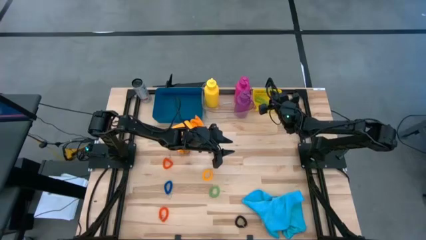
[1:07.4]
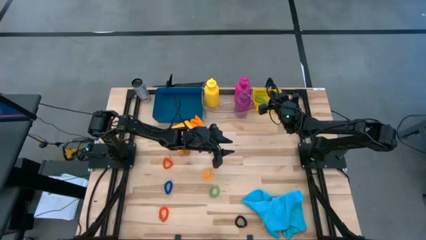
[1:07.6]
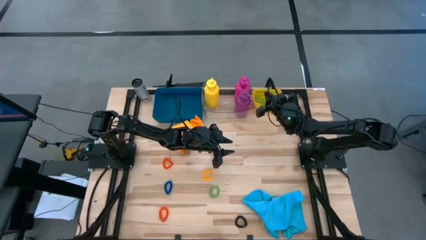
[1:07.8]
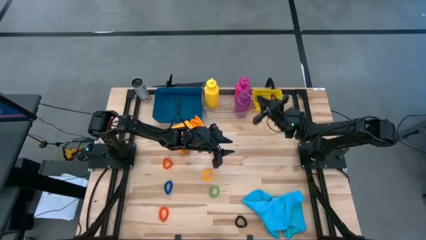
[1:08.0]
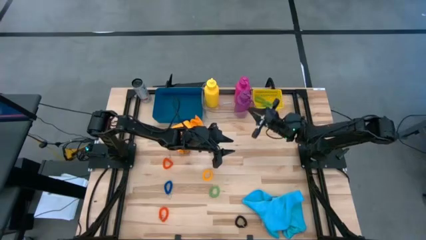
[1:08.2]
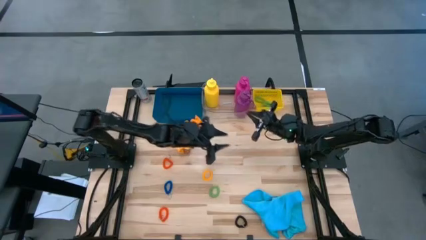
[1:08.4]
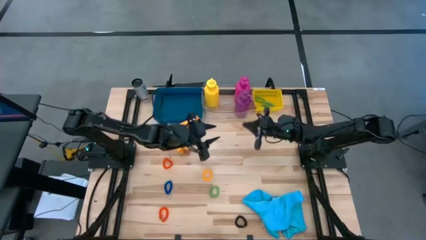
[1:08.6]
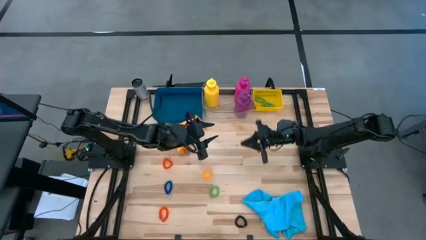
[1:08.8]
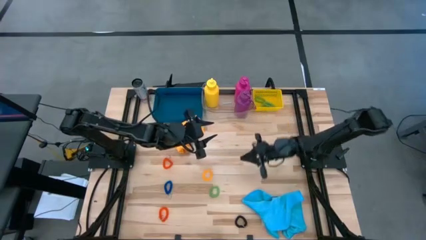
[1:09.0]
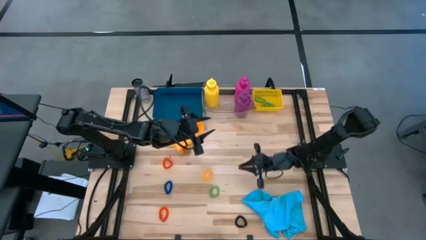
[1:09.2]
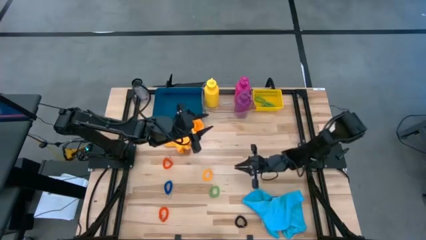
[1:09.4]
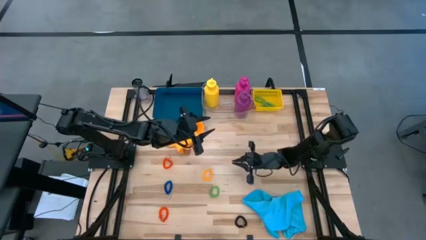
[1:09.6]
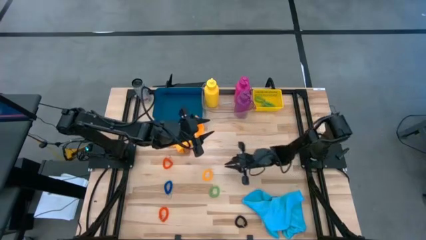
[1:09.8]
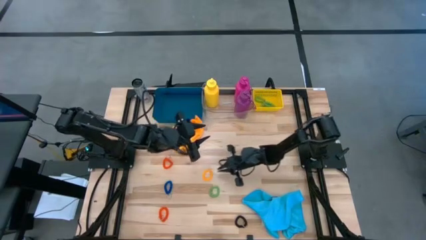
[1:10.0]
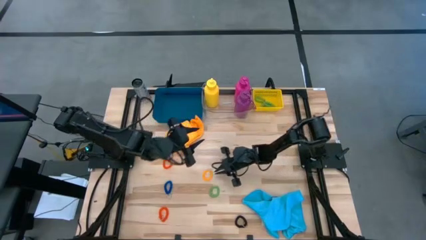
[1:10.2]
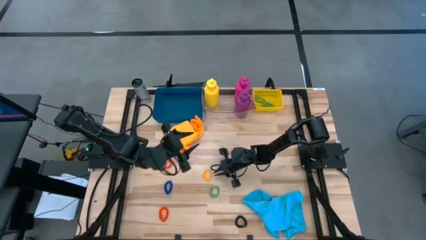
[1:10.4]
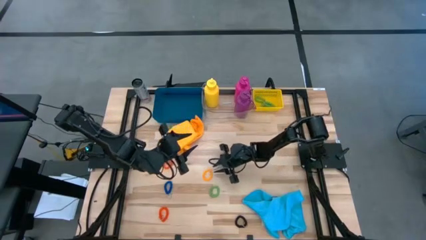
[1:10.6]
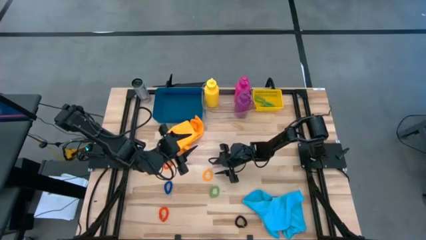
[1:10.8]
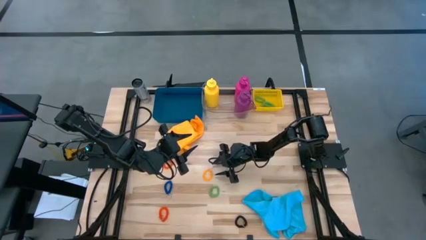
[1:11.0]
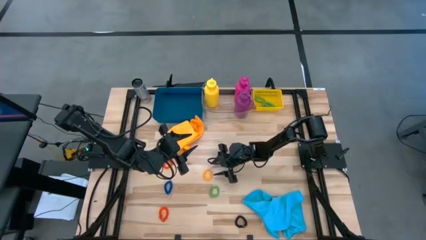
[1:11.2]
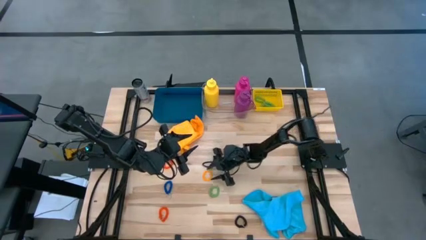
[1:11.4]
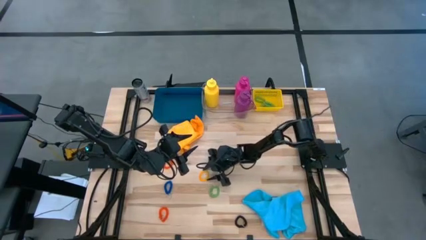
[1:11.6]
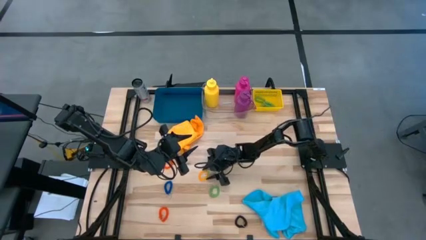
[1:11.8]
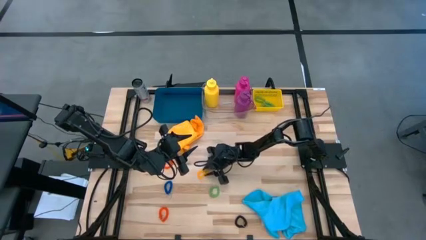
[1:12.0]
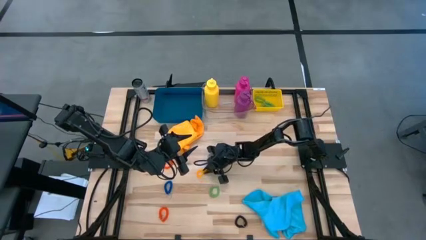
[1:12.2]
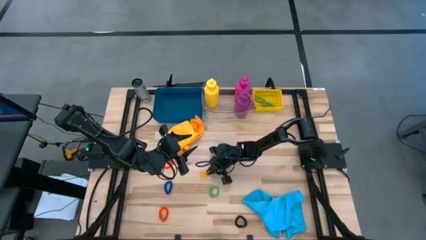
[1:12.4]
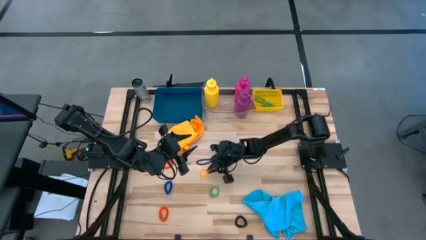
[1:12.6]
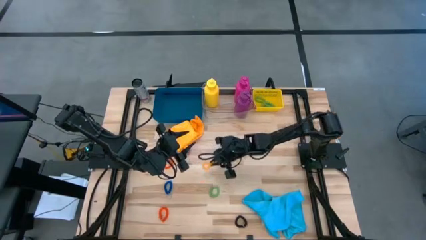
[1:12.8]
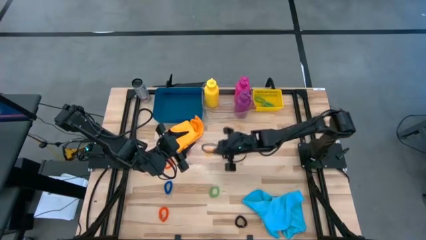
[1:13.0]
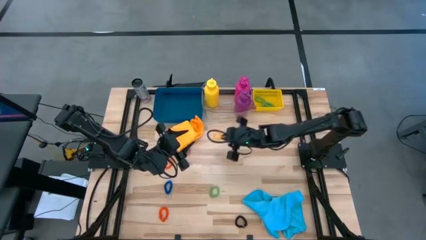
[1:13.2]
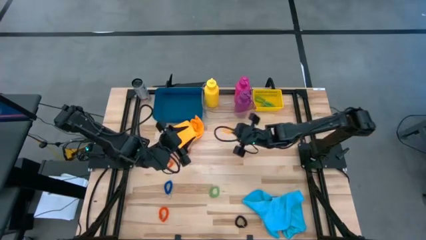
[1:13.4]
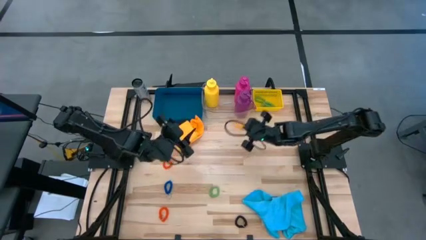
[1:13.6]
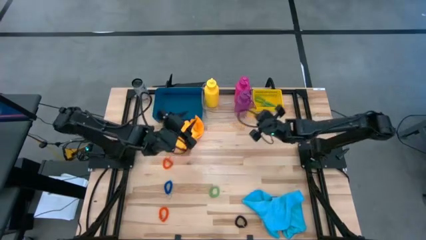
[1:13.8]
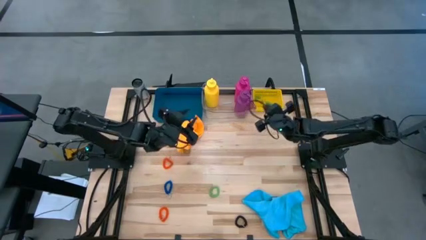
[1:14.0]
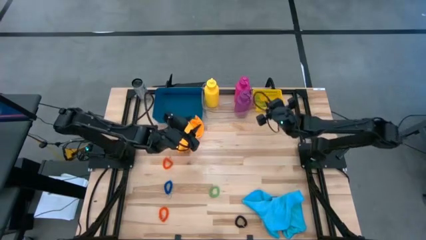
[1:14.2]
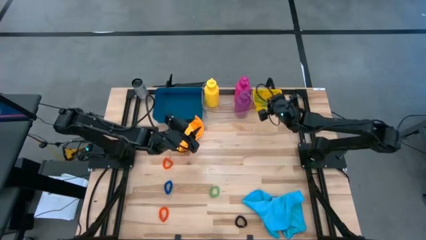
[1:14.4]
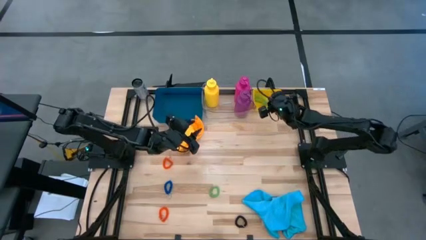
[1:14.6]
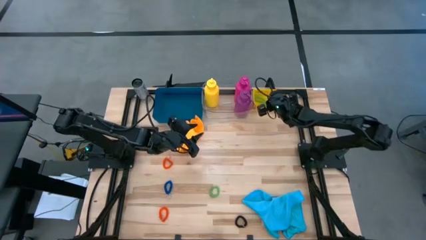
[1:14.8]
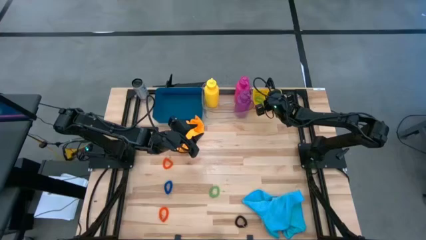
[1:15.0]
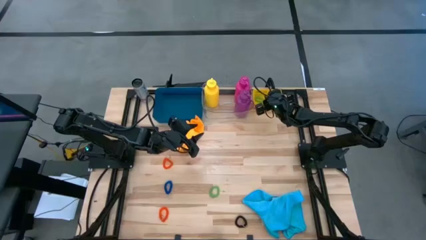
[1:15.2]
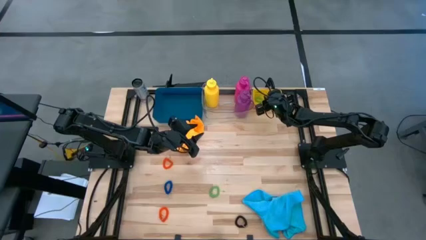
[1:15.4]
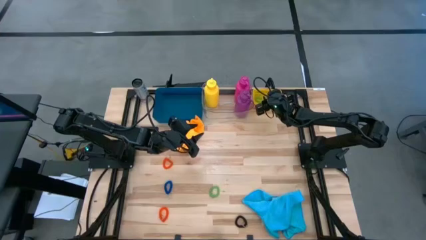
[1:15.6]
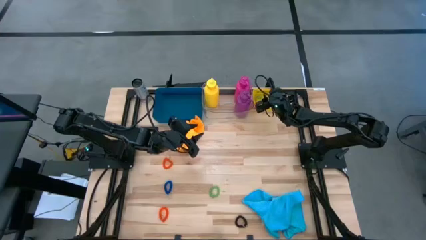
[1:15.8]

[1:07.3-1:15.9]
Task: Pick & Place Sports Items
Put the yellow spring keychain into the yellow bin

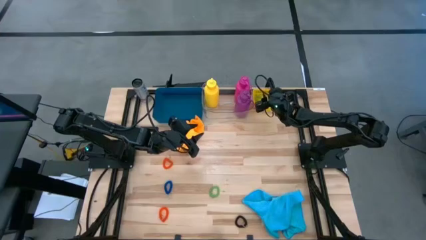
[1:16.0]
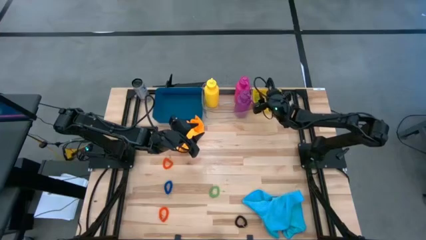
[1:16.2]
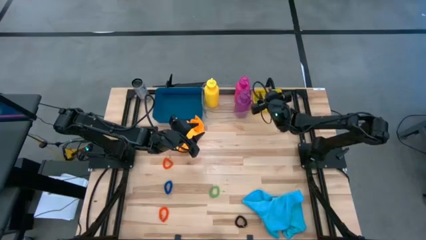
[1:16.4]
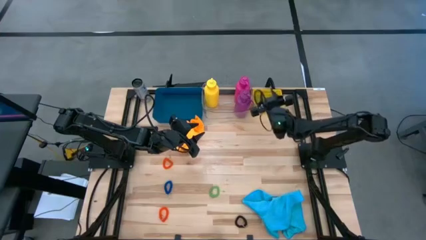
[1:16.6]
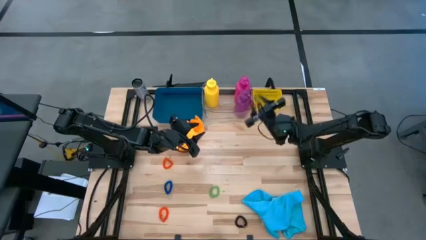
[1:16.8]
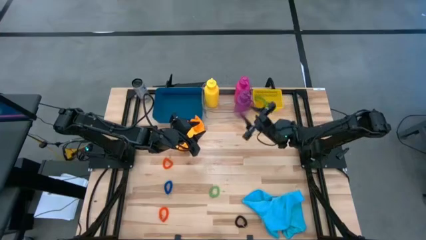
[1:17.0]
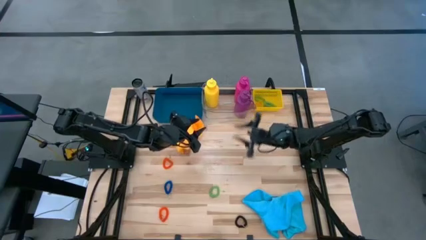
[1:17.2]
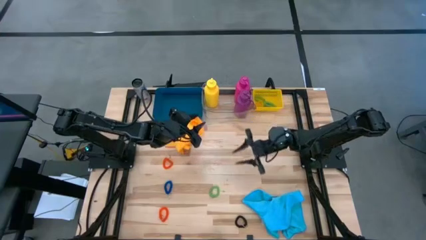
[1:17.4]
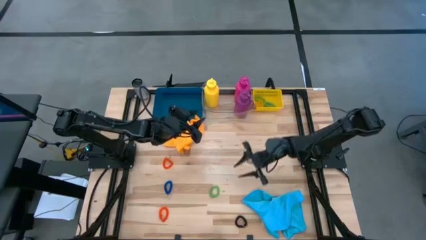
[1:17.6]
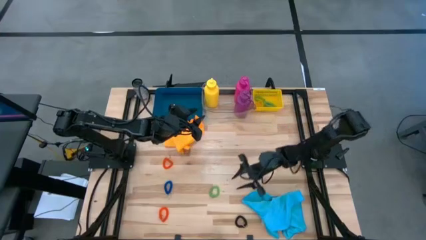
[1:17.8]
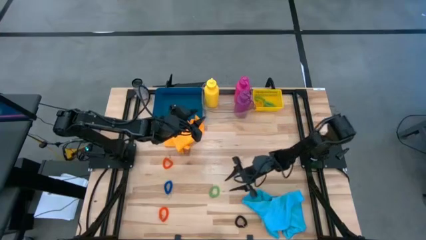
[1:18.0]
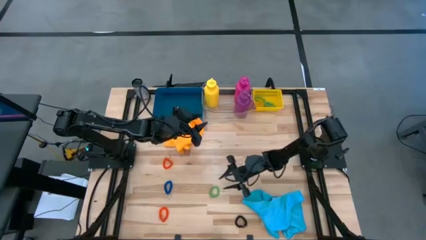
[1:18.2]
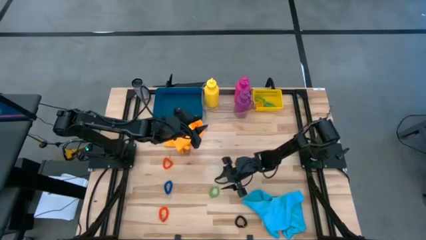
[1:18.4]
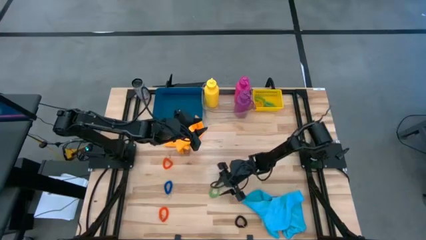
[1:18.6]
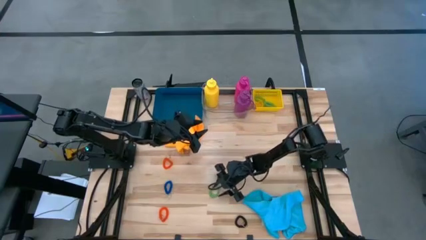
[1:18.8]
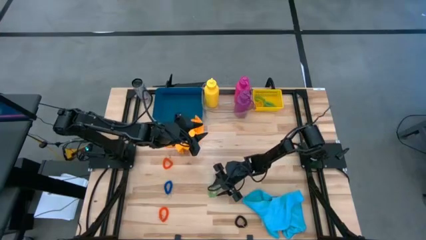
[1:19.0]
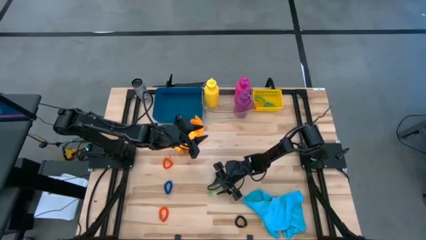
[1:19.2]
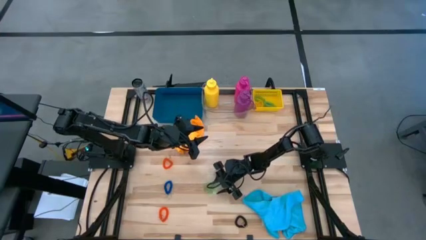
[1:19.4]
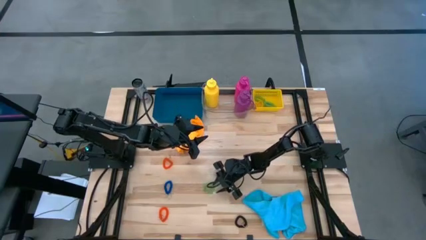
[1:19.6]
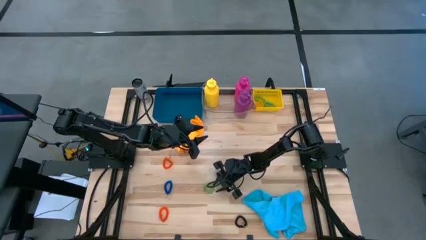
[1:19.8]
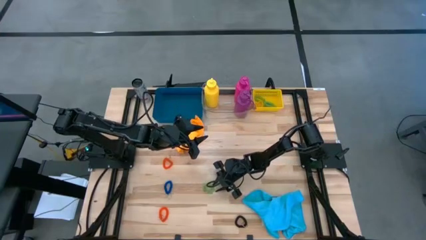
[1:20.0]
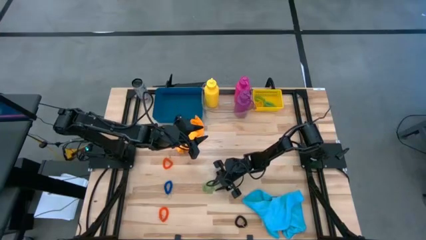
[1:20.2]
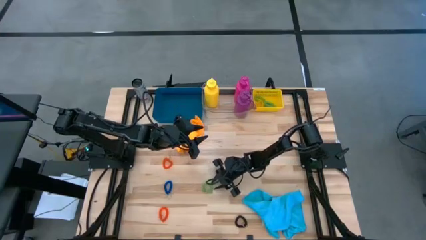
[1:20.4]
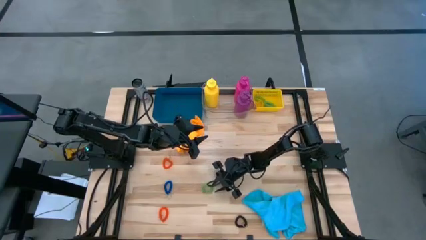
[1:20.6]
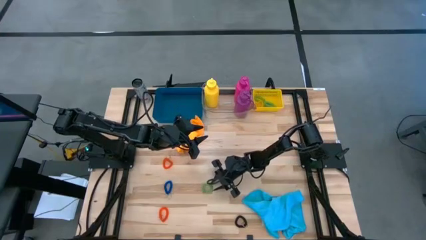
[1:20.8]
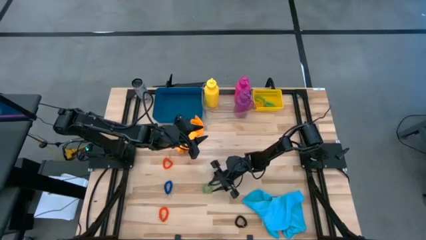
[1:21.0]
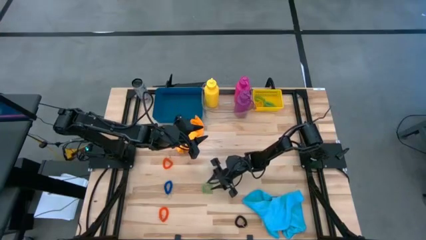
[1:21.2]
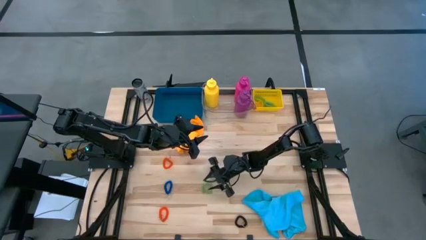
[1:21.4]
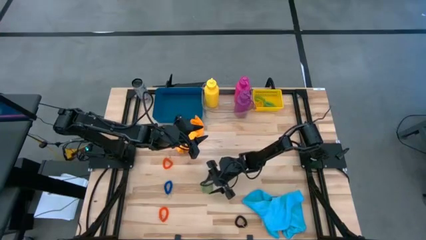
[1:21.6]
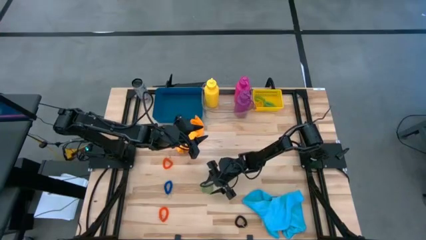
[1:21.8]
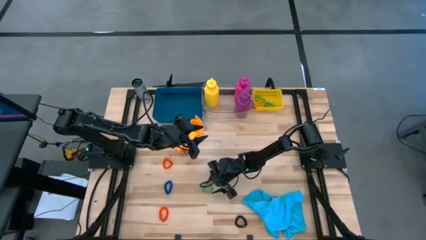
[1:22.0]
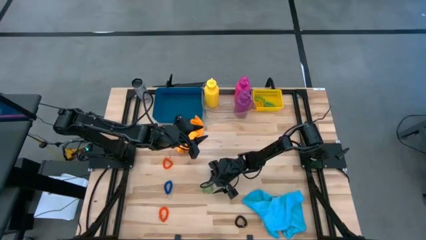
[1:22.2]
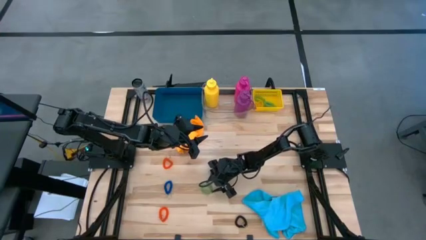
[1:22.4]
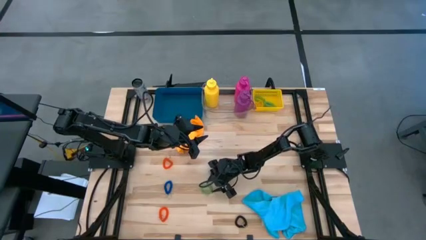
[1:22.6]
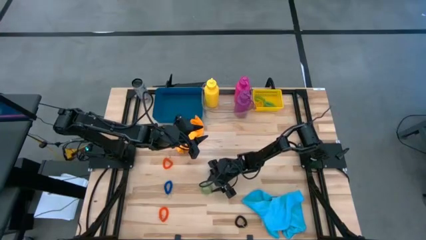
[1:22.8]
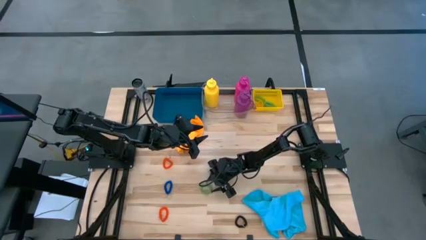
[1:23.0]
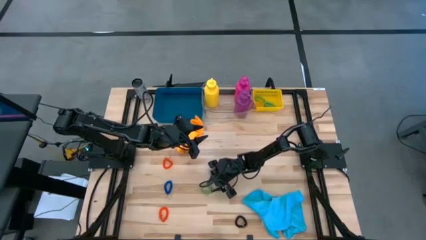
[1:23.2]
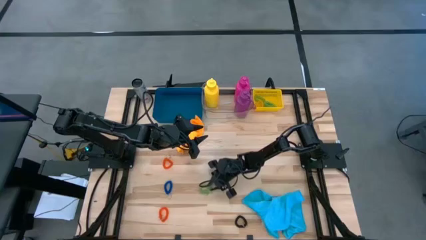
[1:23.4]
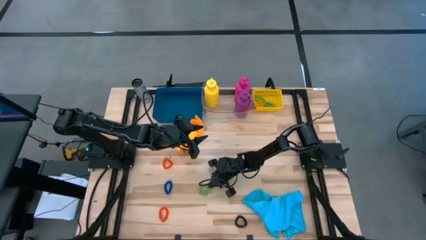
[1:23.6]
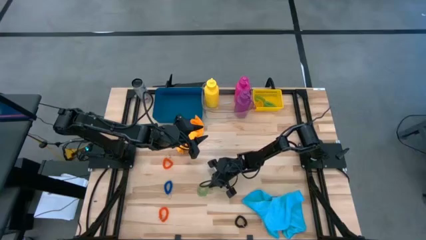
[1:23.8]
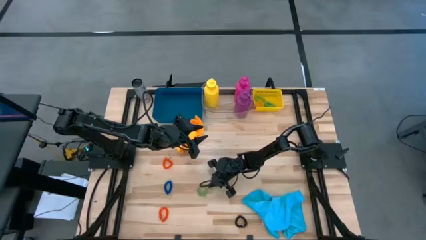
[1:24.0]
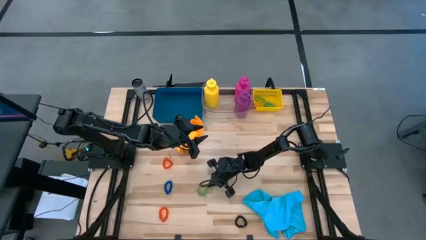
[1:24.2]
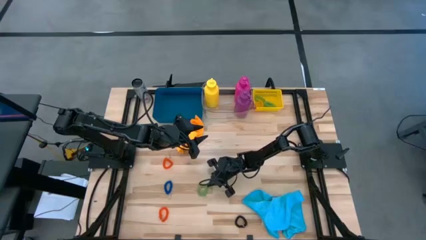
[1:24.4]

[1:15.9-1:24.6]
Put the green spring keychain into the yellow bin
